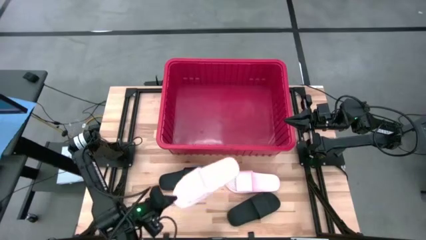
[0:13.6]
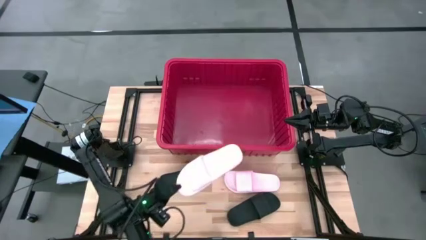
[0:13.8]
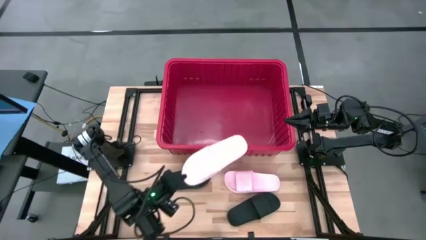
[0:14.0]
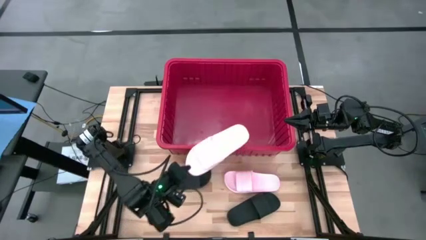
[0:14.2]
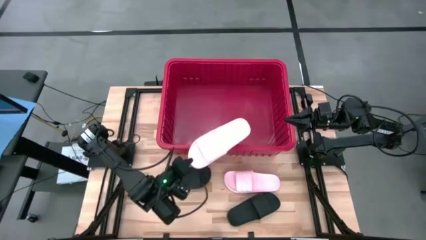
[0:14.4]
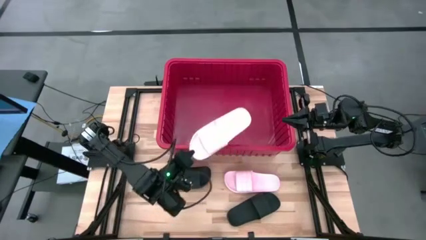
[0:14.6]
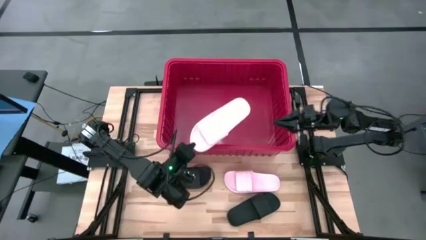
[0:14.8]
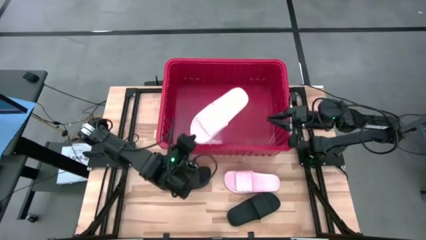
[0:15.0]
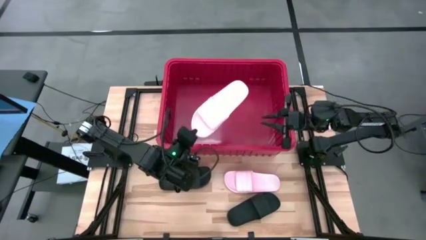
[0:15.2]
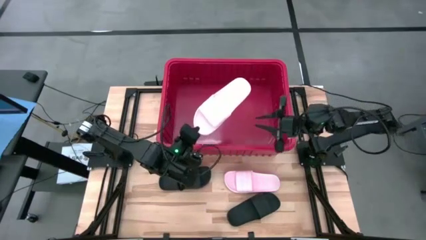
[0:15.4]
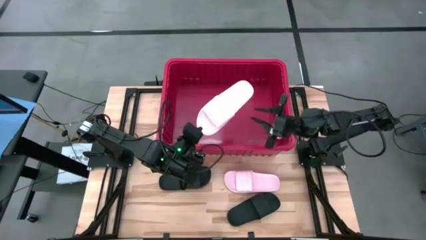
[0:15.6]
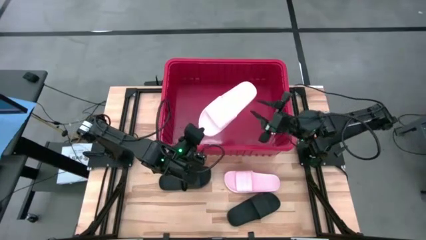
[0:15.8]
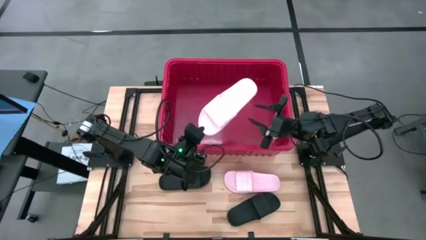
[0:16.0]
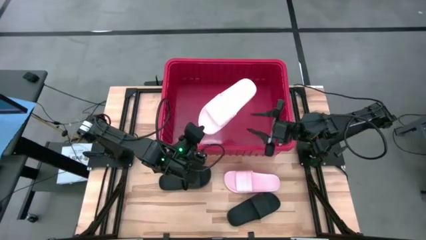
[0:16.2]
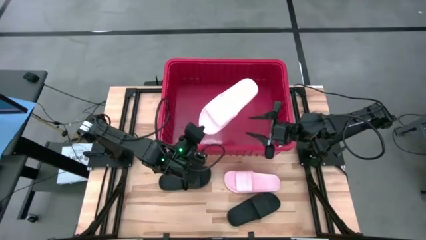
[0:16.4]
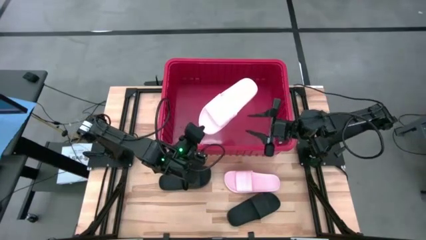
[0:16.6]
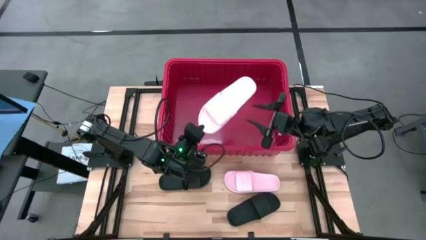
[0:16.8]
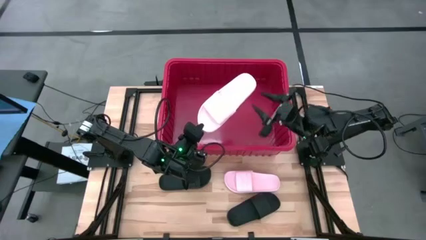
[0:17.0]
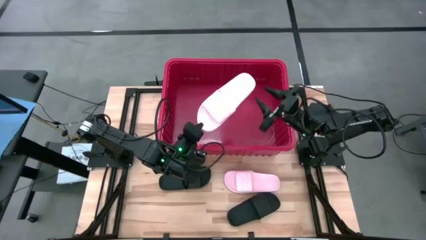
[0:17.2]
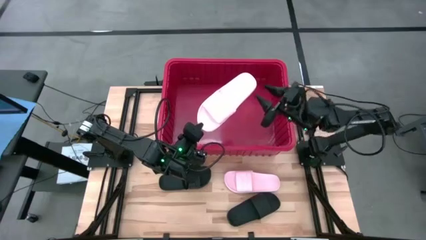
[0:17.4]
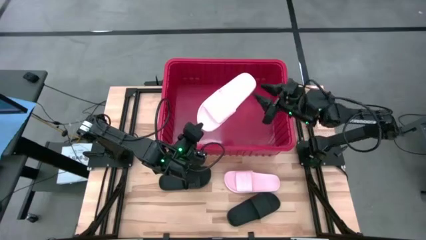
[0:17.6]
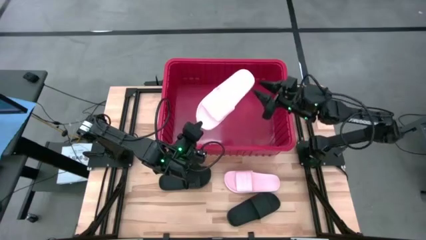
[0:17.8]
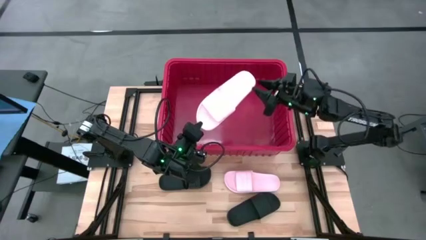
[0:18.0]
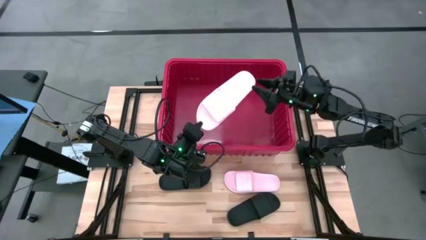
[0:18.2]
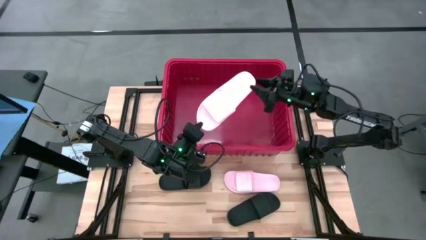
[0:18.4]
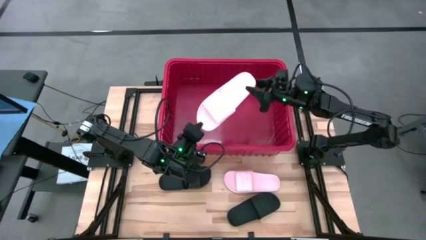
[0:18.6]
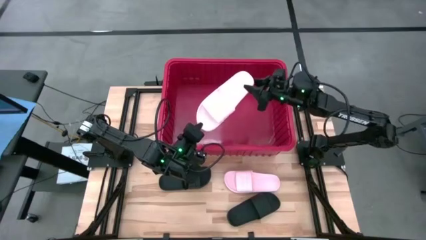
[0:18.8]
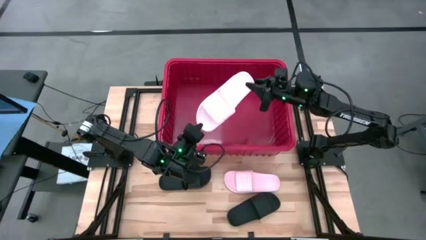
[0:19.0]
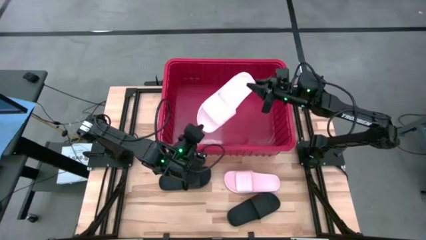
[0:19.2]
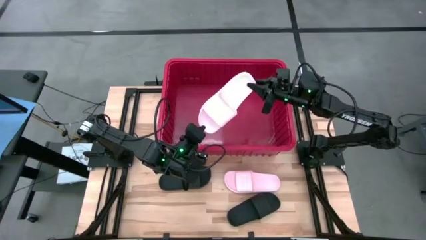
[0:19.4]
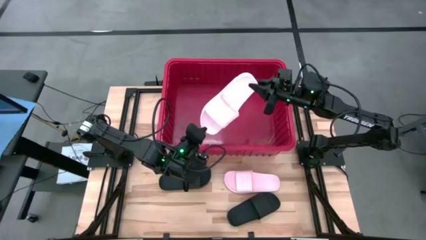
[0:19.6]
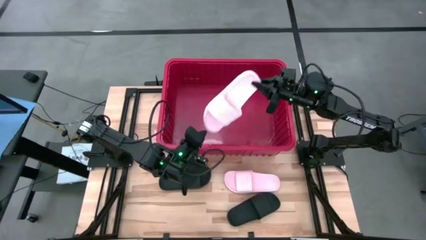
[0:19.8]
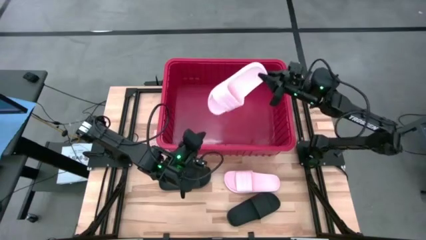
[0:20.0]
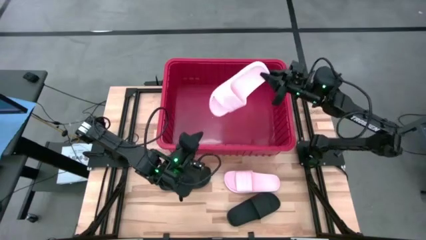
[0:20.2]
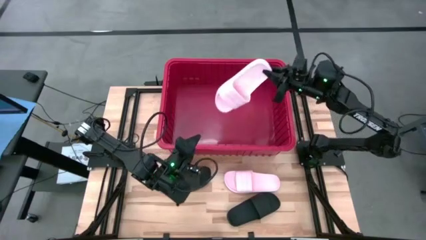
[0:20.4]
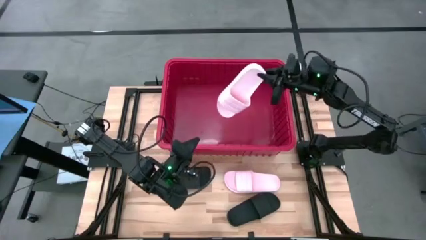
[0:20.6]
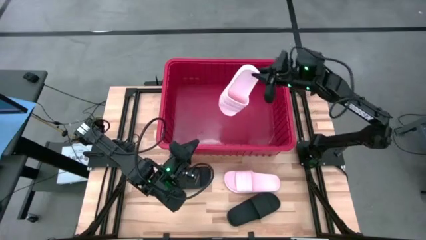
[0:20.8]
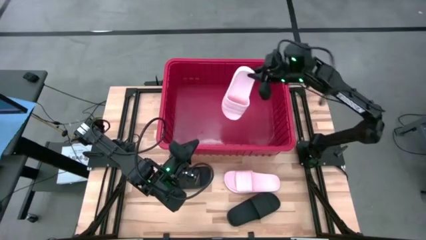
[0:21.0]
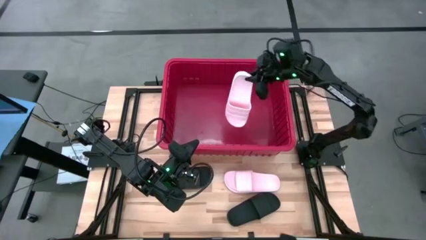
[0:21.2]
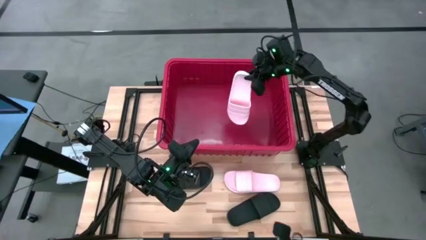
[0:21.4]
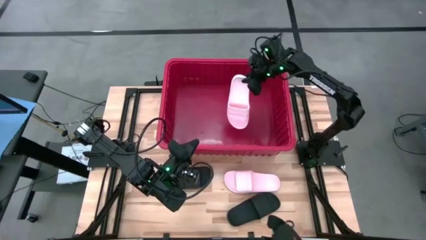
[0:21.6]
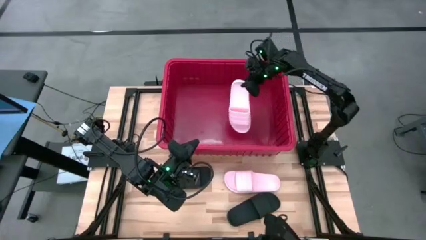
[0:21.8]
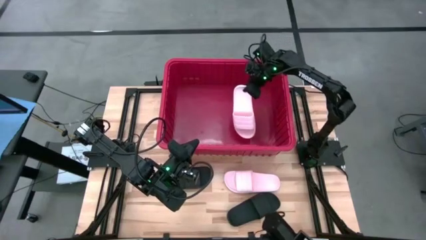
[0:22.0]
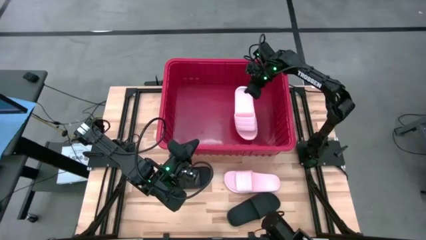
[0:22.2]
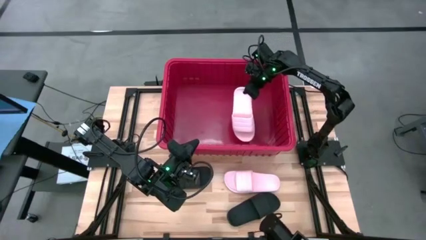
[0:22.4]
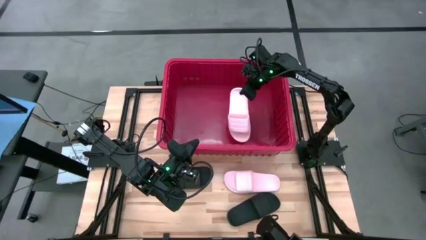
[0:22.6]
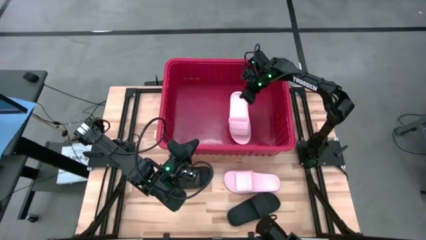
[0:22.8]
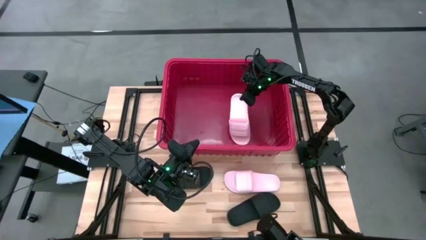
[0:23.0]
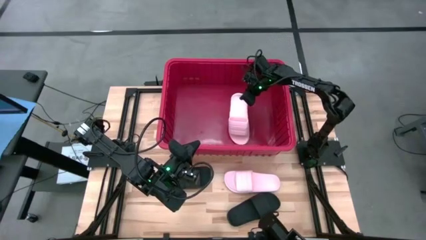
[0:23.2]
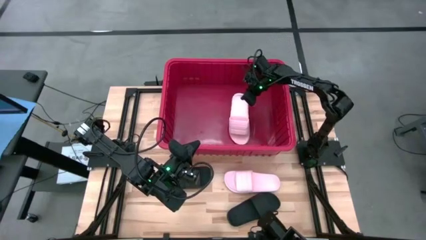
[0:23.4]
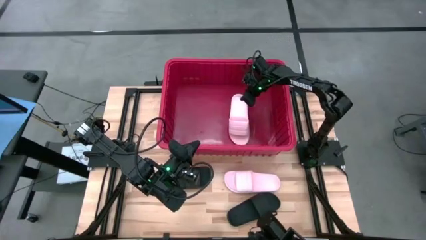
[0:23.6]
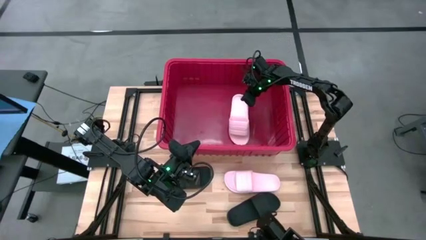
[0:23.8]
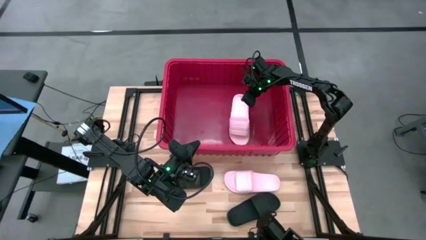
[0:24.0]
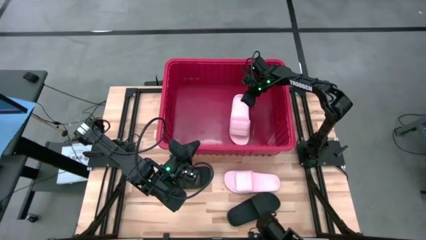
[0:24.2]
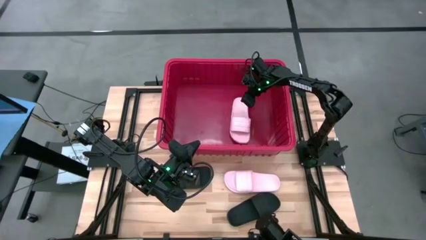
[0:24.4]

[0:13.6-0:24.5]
Task: Pick and place slides into bin
Put the left pink slide into the bin

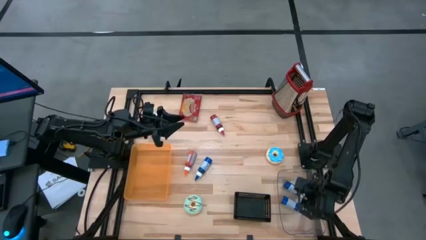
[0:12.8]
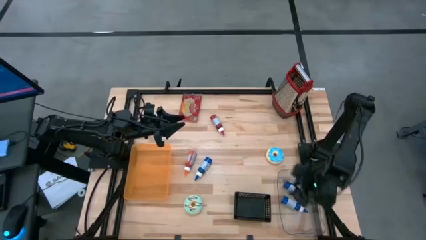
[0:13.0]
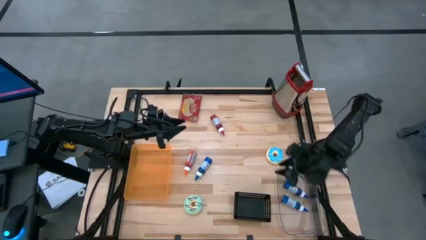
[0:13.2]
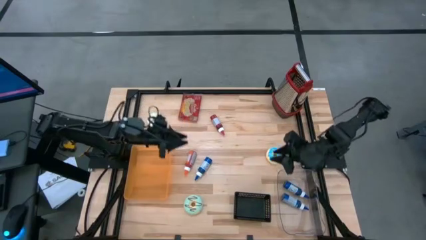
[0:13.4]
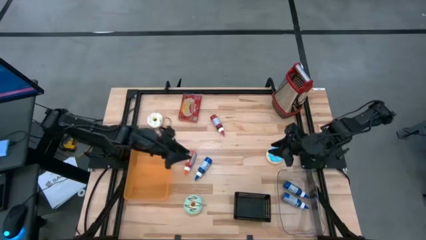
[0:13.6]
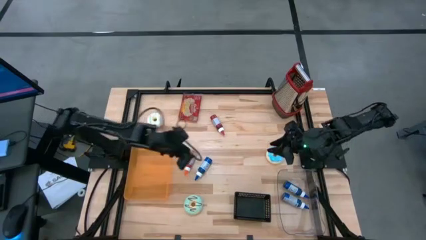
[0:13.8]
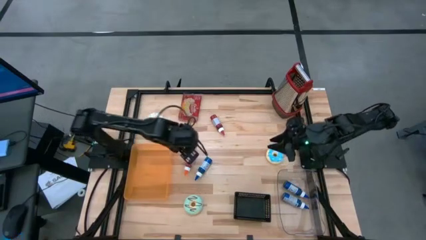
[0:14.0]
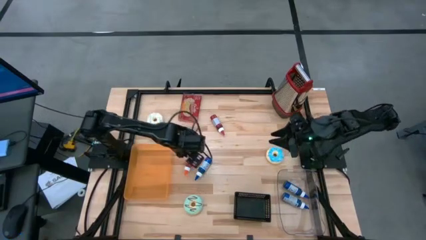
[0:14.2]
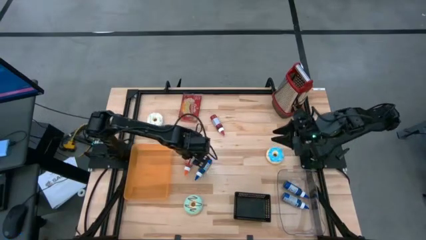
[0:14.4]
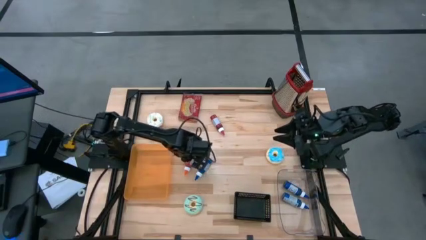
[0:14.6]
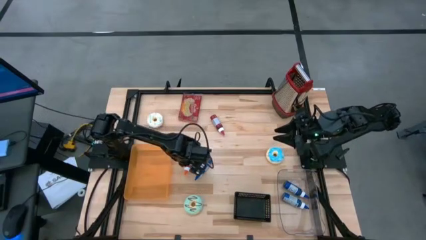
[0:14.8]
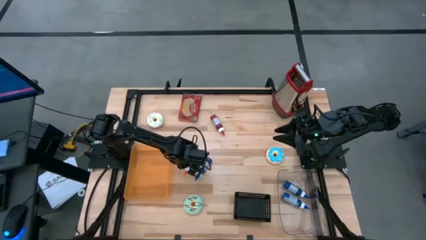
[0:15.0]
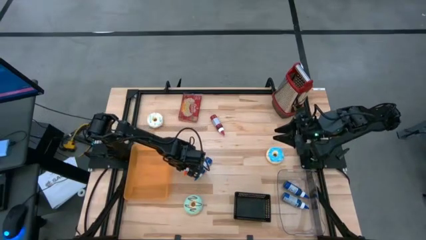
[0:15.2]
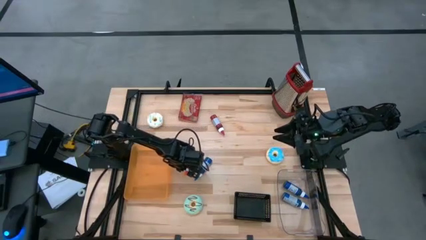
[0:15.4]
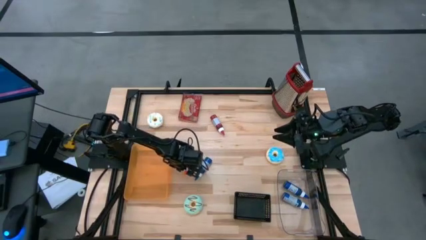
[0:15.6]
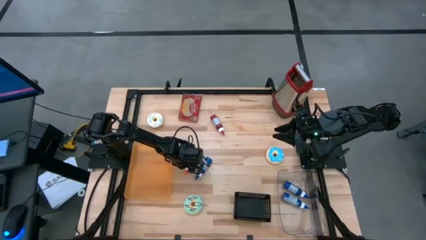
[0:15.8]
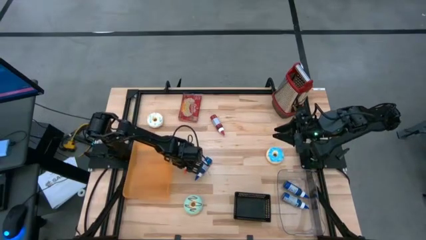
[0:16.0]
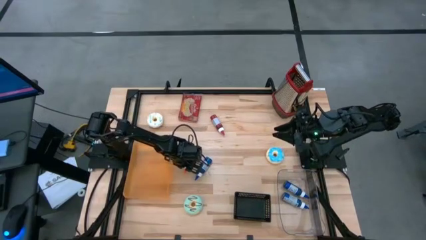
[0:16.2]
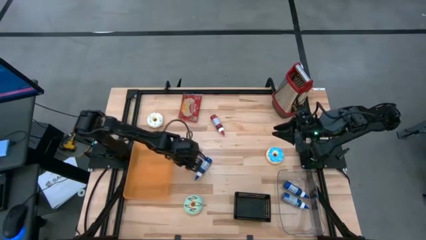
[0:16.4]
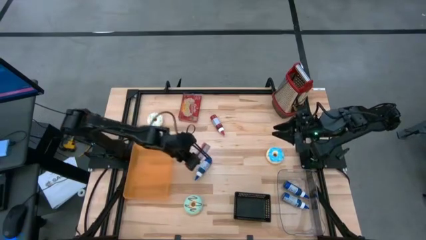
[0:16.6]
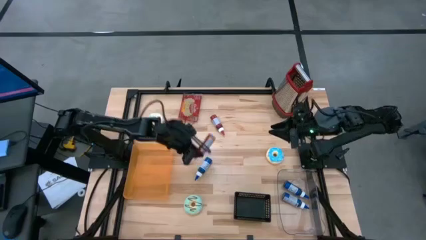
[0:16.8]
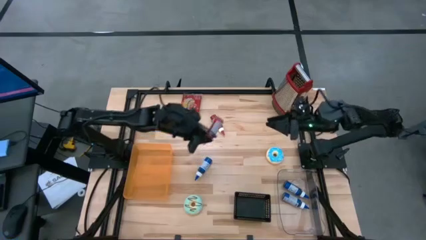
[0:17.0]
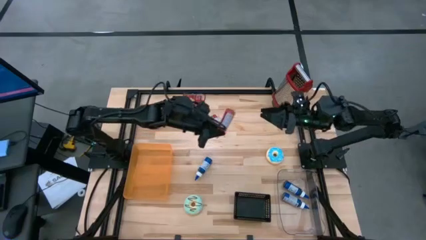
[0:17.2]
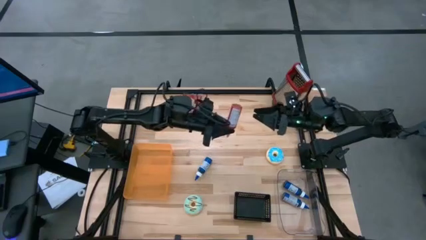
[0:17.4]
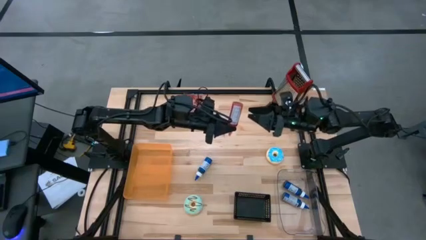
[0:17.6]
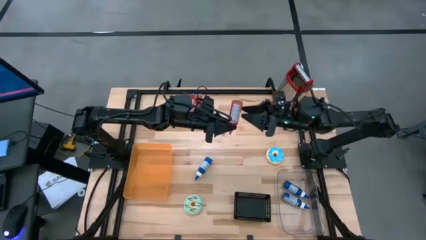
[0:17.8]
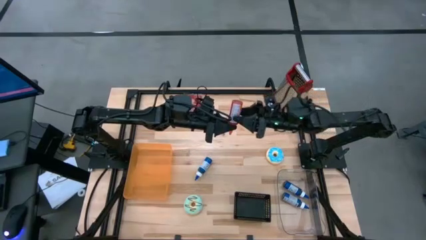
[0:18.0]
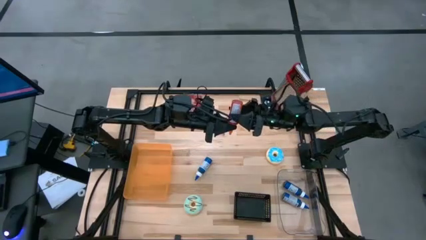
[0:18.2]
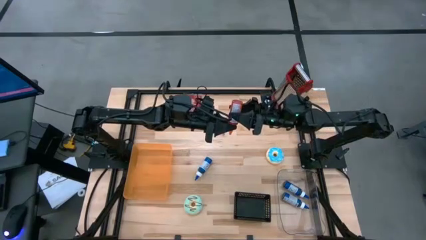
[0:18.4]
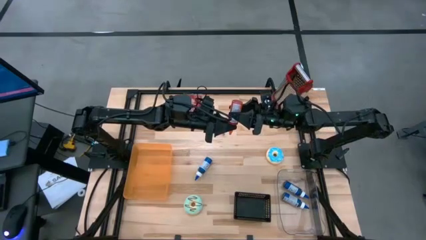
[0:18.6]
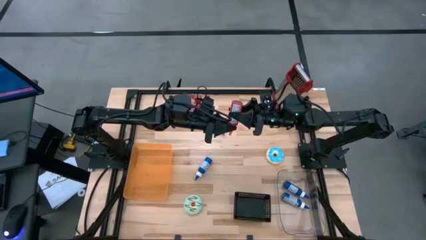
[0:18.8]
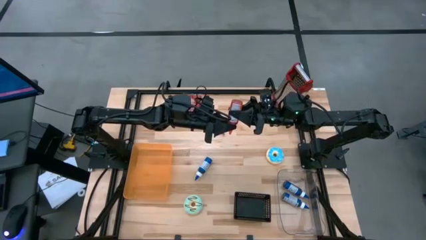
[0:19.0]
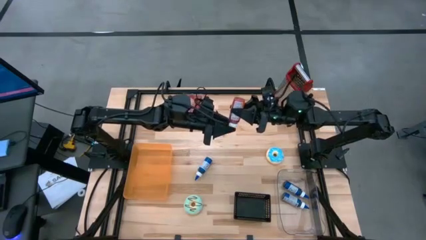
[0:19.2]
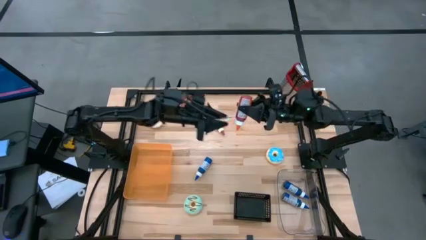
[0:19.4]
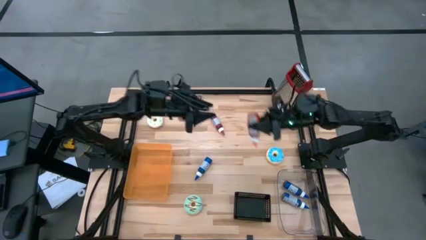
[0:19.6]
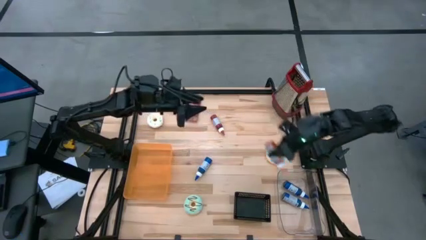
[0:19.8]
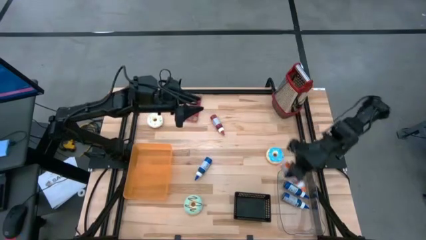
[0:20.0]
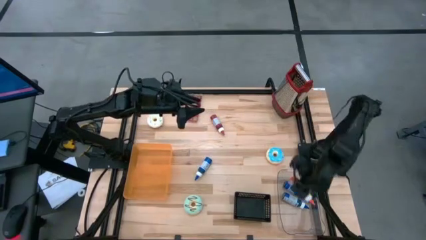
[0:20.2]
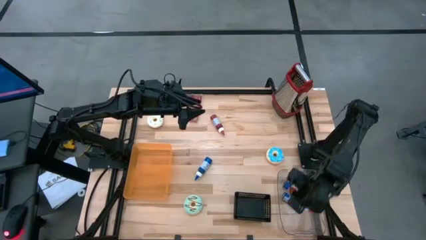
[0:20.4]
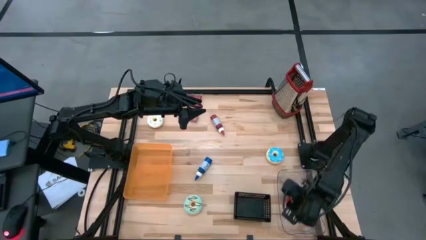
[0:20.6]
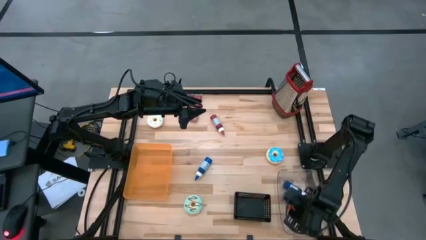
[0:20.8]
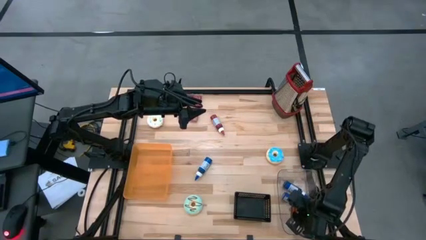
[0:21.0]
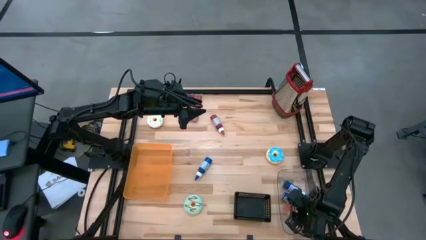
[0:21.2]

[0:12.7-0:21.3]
Task: Pick & Place Food Item
Put the orange food coloring bottle into the transparent bin
